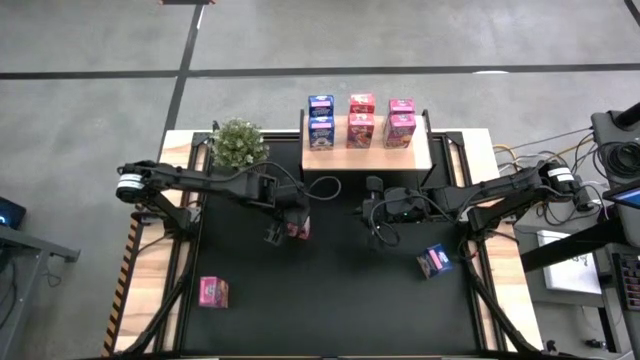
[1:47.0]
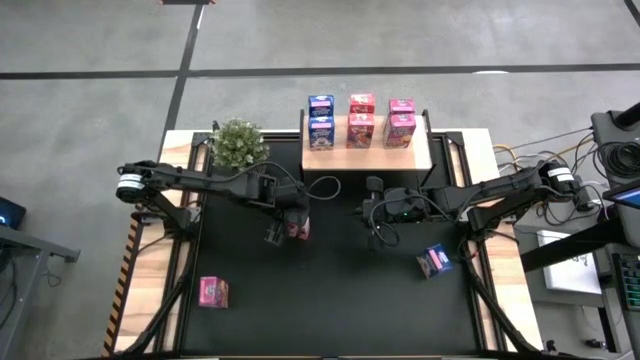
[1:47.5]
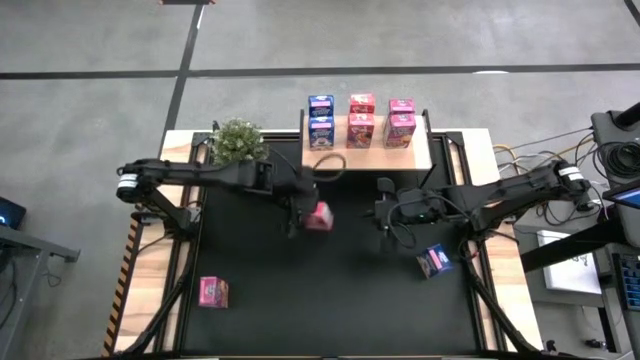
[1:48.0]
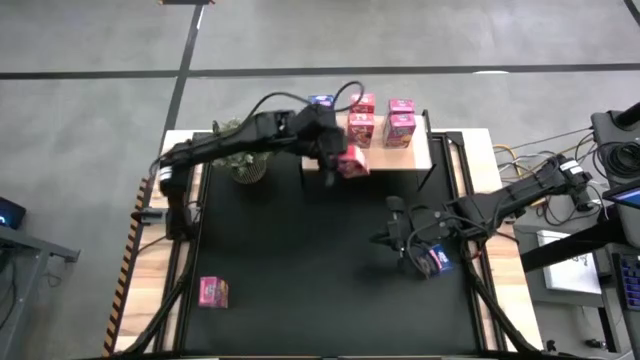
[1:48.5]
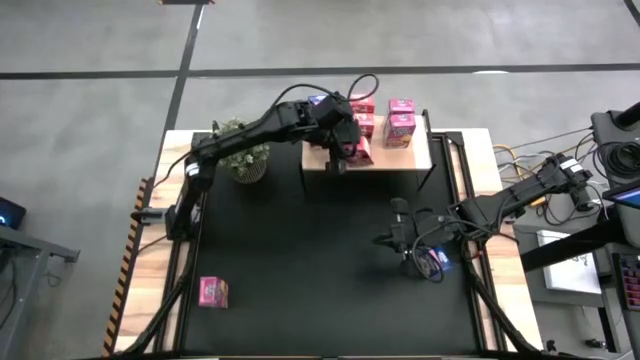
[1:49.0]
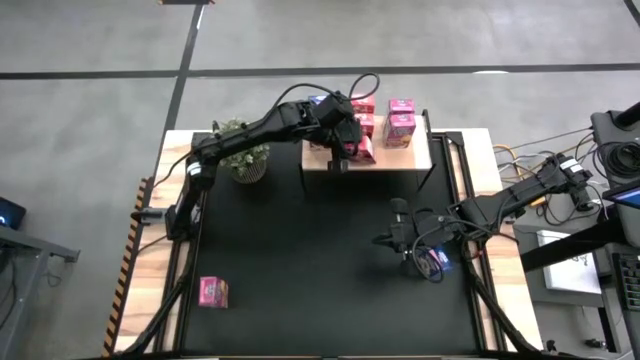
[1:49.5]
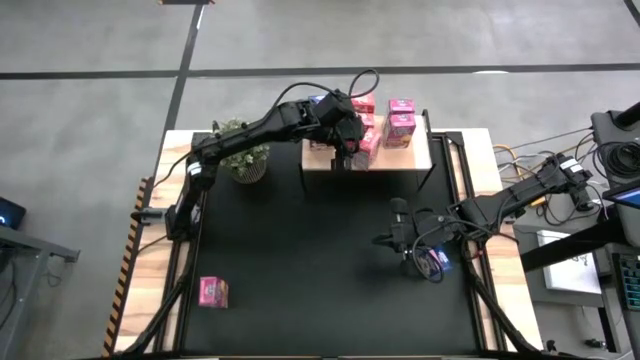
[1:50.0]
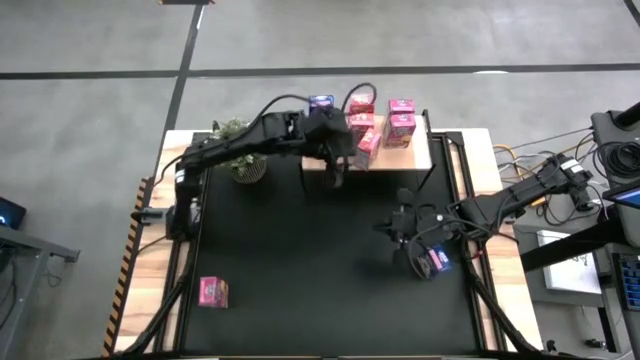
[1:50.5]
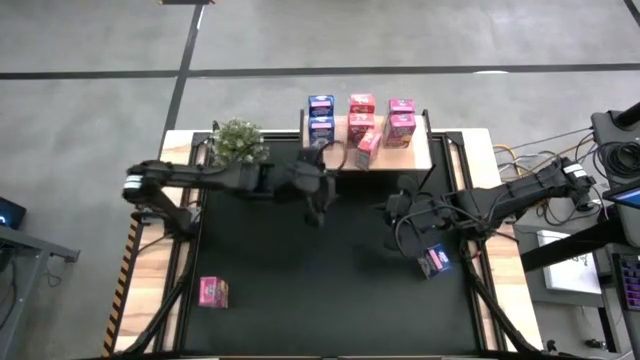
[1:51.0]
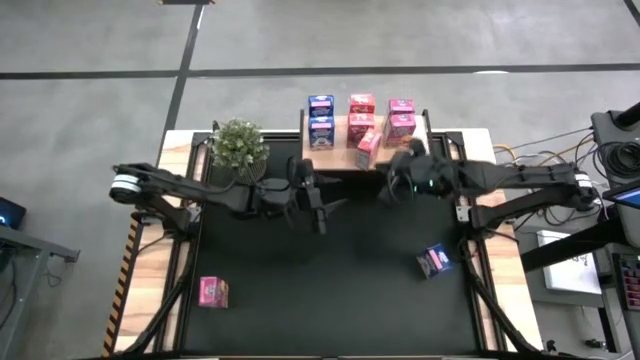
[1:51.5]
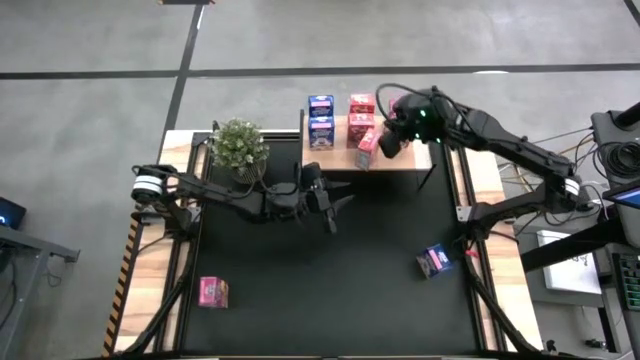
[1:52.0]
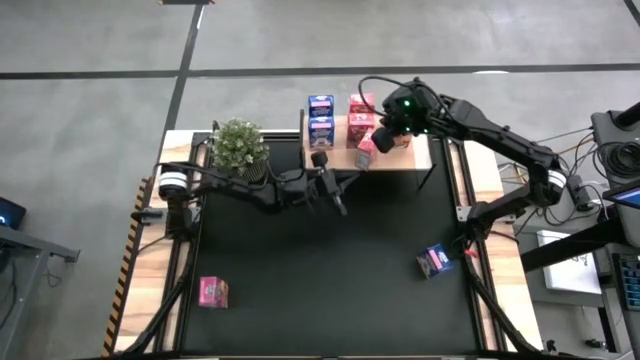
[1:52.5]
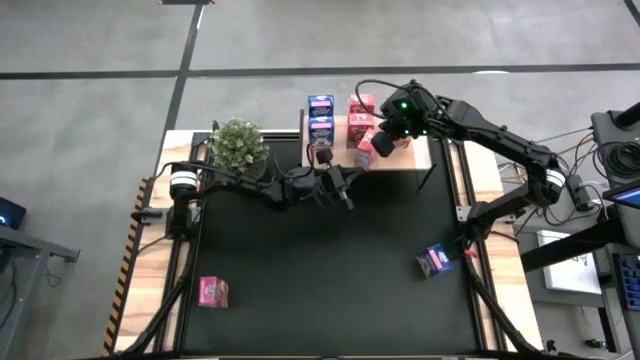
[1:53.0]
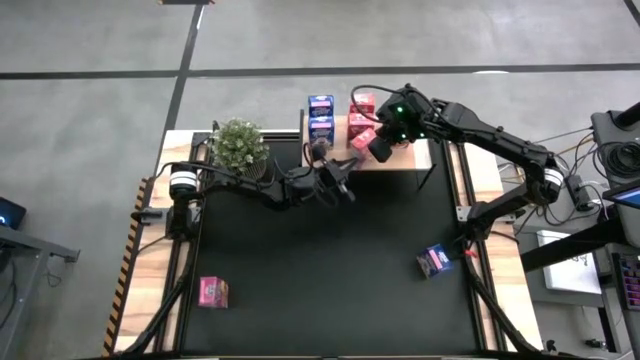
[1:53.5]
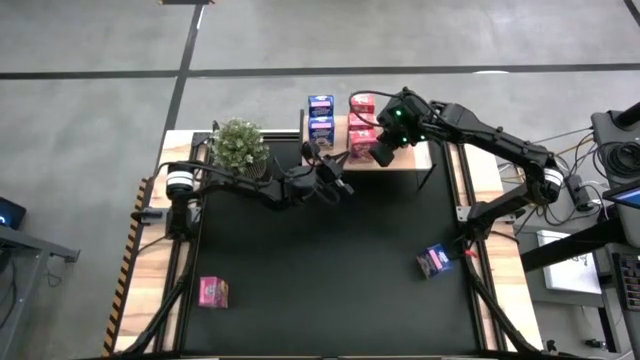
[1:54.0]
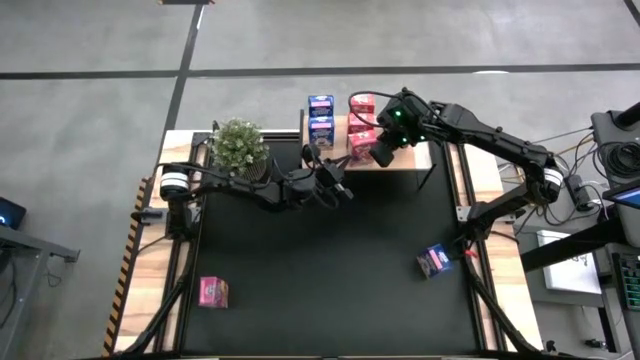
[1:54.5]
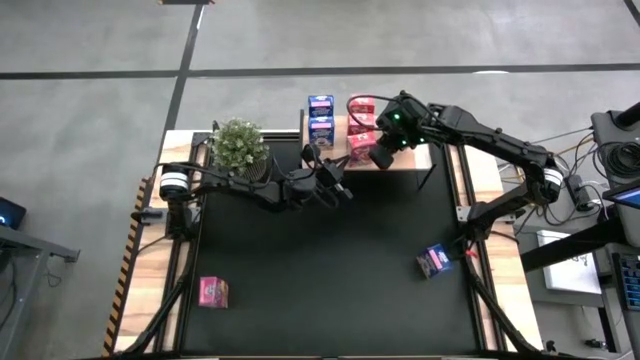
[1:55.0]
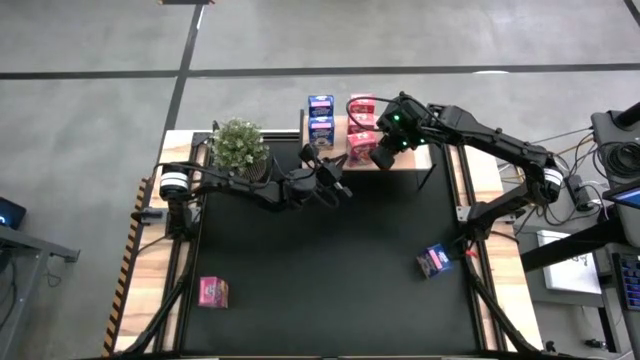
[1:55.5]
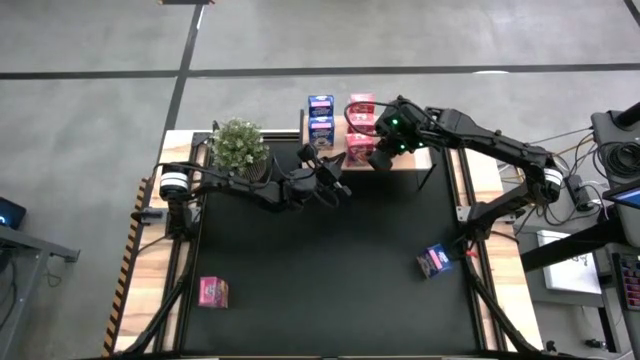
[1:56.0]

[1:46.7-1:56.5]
Task: Stack cereal on shelf
Put the red cereal box on the shelf and align it with the other red cereal boxes on the shelf

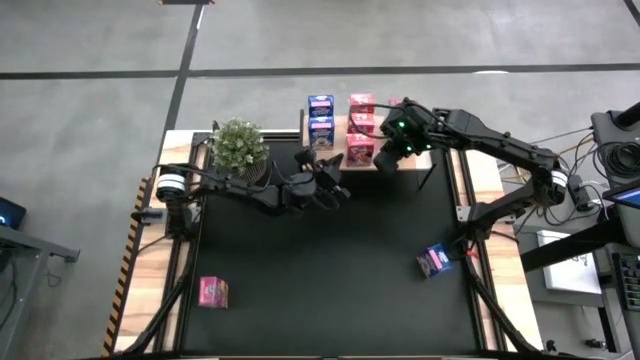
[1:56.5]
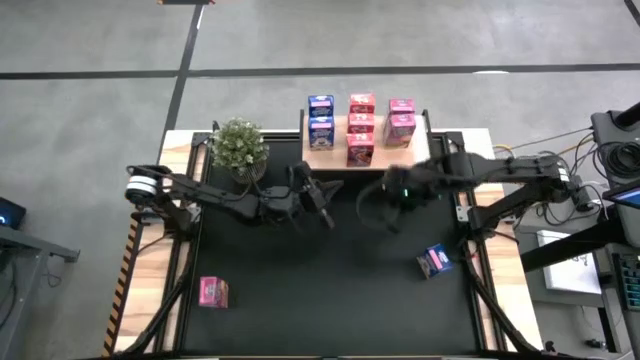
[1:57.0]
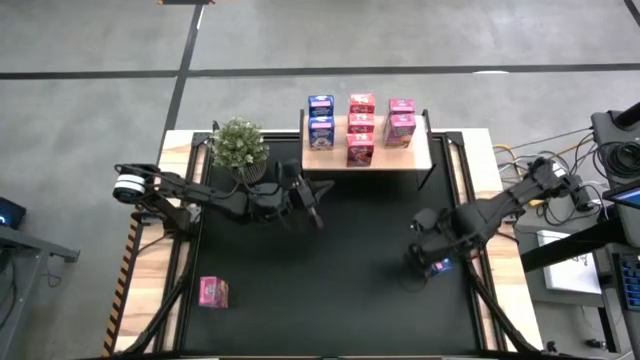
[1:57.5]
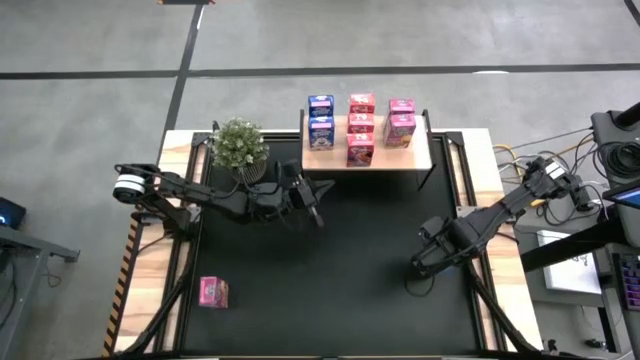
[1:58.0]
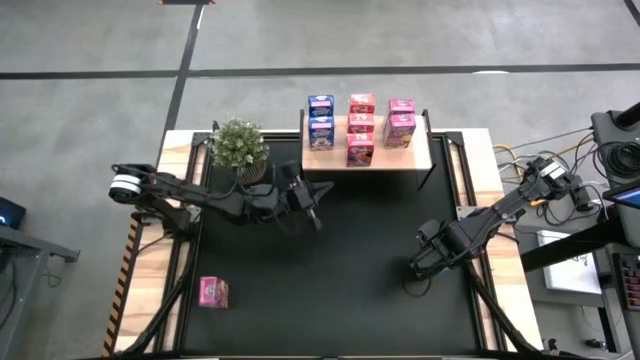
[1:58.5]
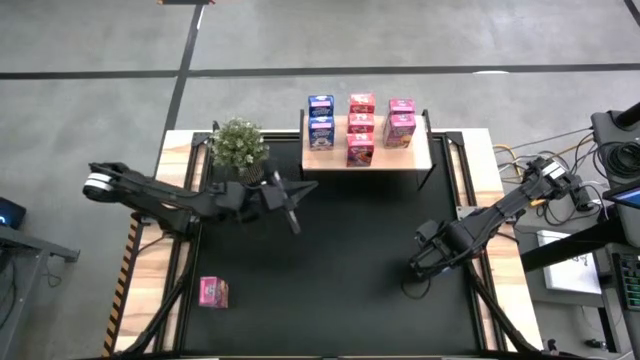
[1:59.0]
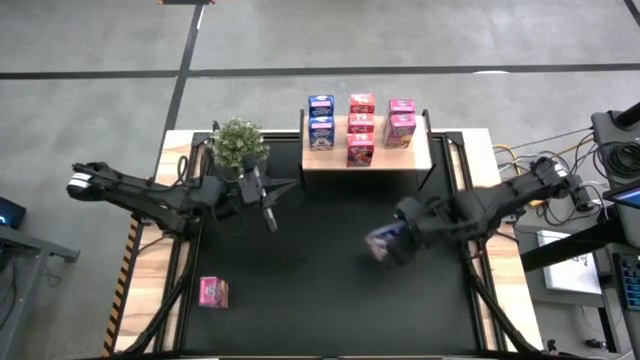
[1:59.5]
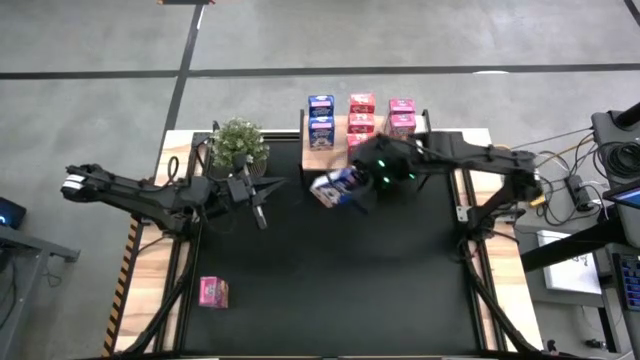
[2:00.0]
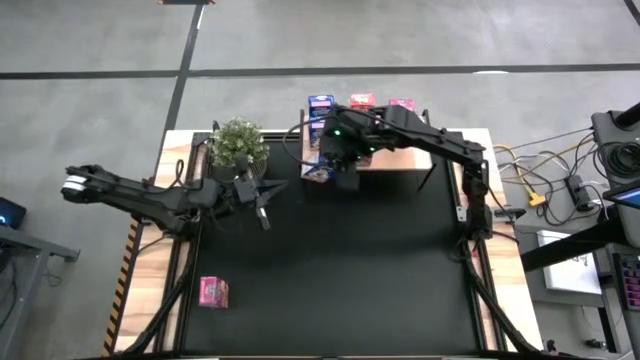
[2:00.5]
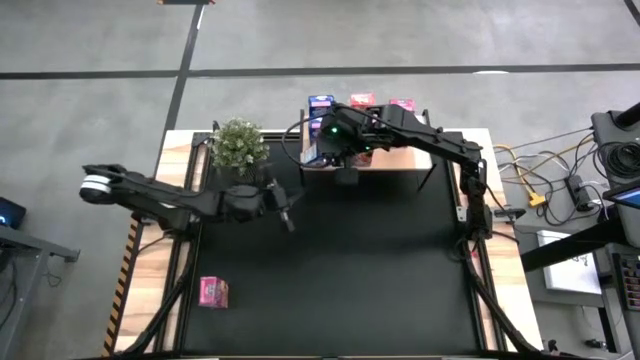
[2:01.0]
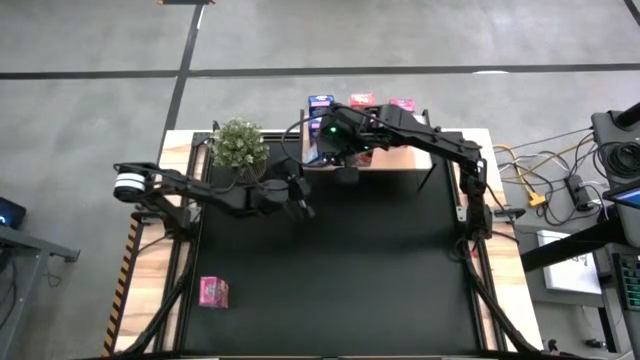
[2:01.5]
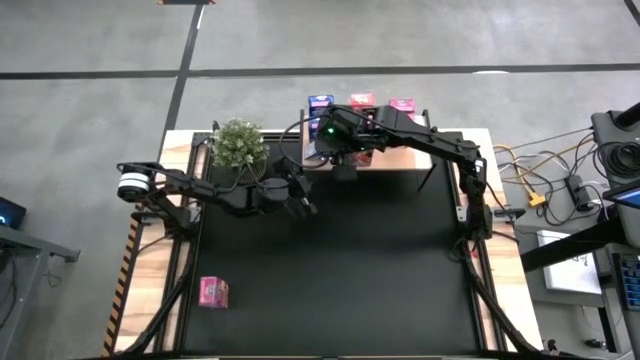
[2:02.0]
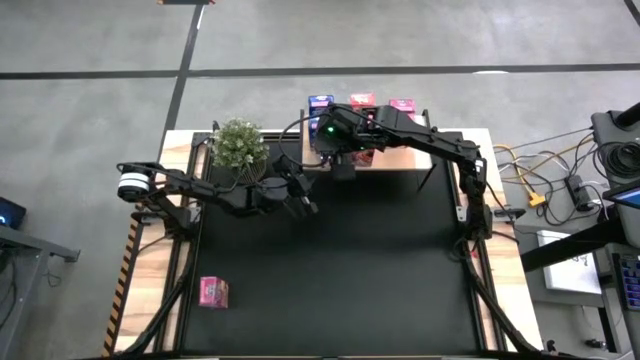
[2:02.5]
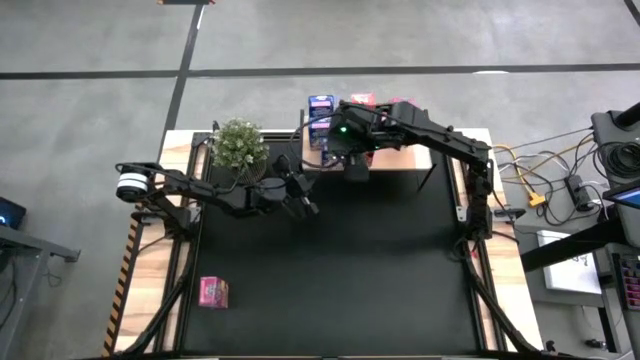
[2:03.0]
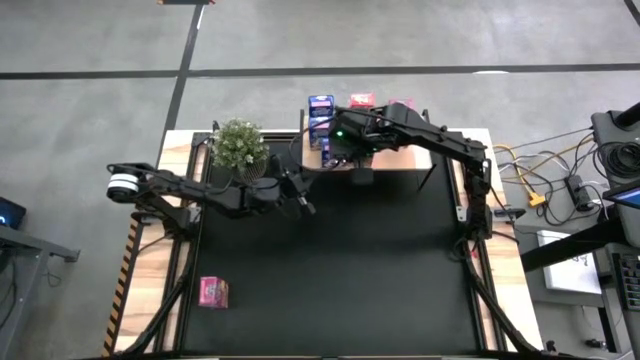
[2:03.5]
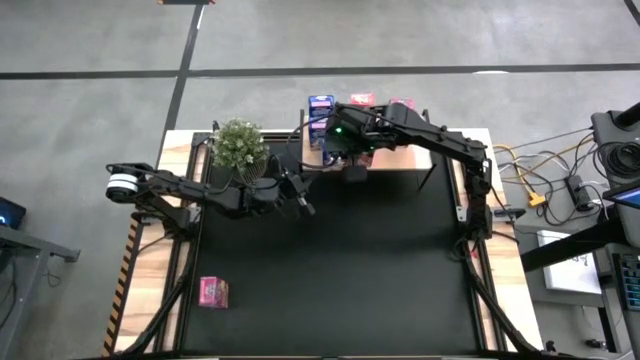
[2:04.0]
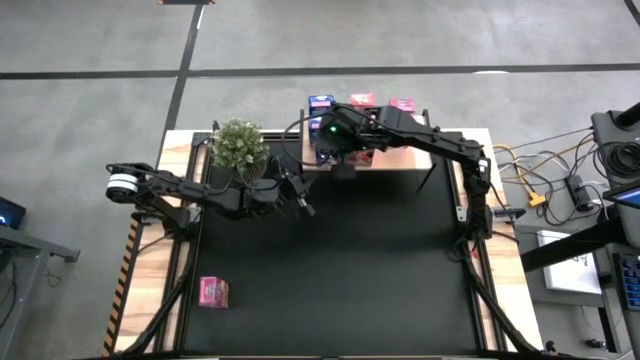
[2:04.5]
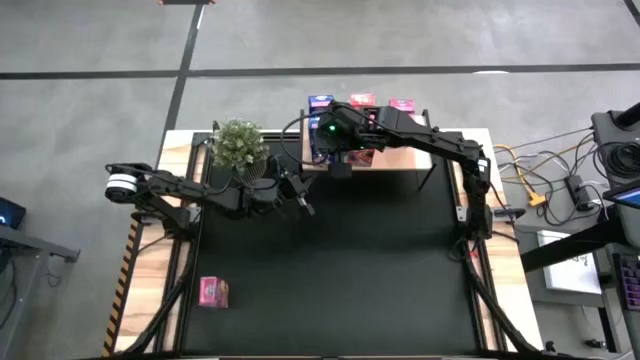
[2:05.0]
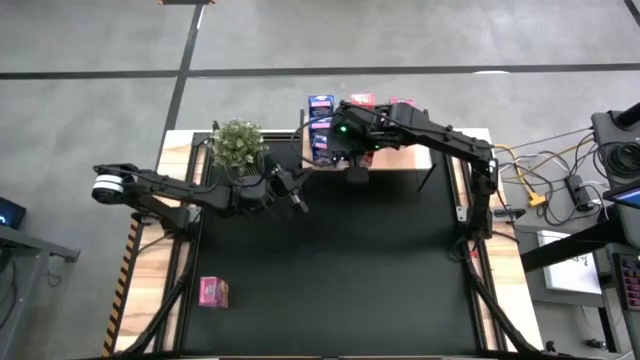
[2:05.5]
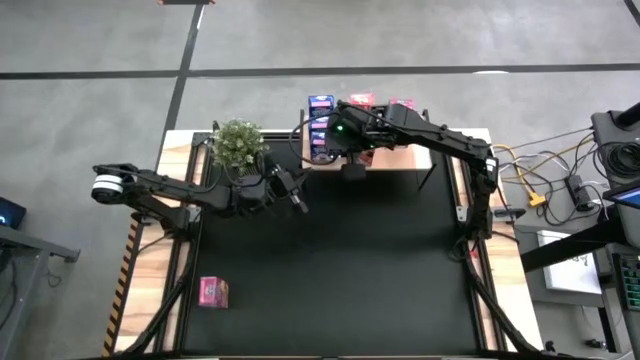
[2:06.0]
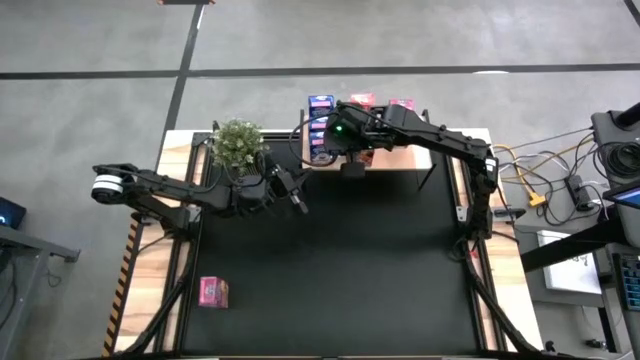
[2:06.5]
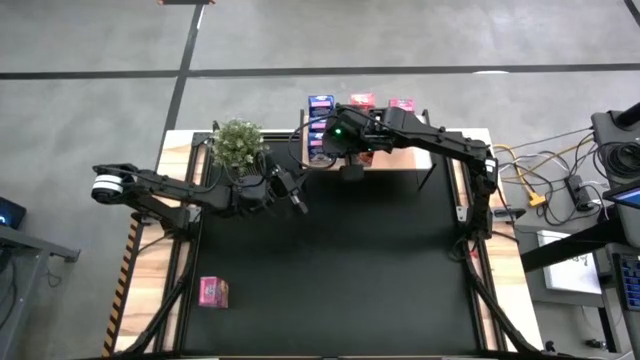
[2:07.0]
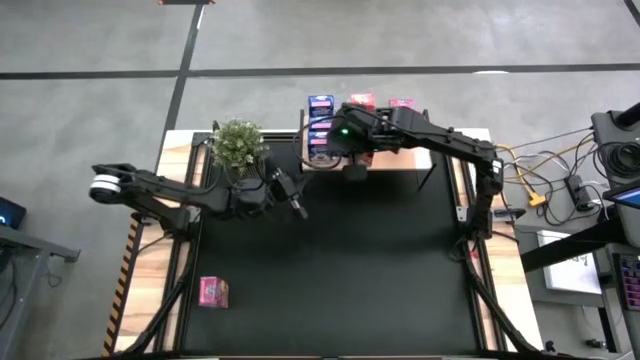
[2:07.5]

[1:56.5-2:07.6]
Put the blue cereal box on the shelf and align it with the other blue cereal boxes on the shelf

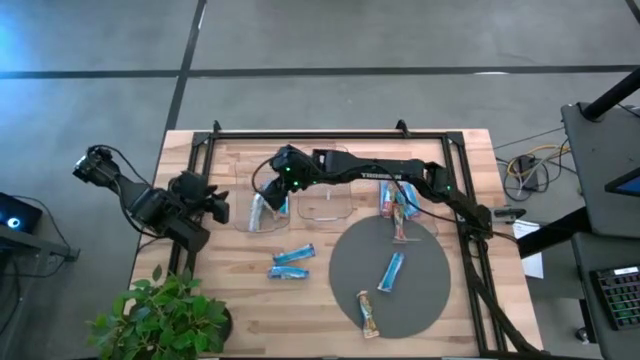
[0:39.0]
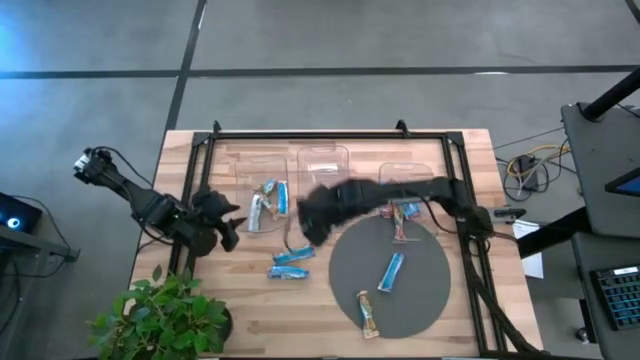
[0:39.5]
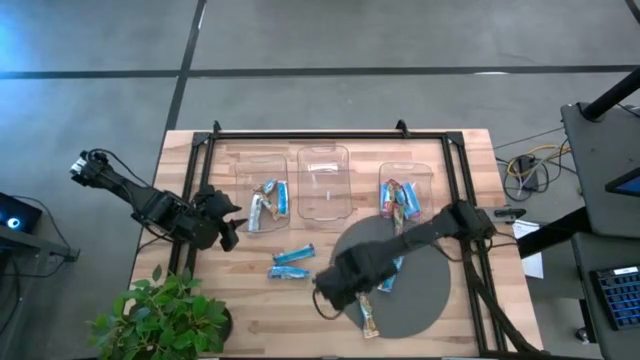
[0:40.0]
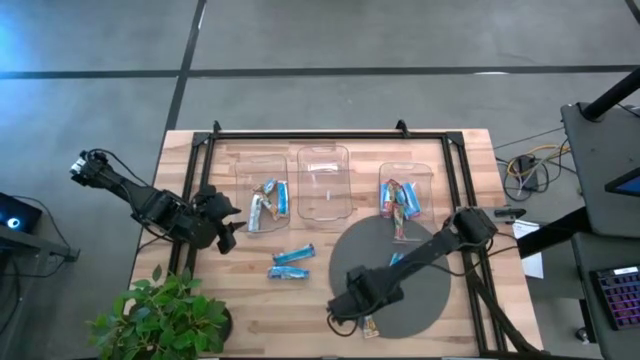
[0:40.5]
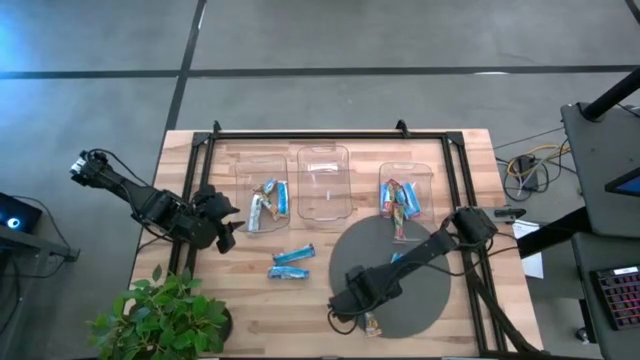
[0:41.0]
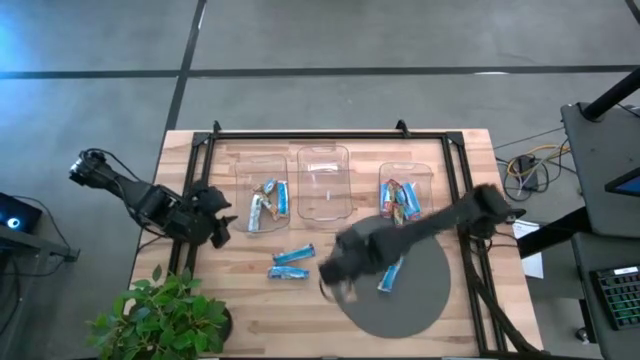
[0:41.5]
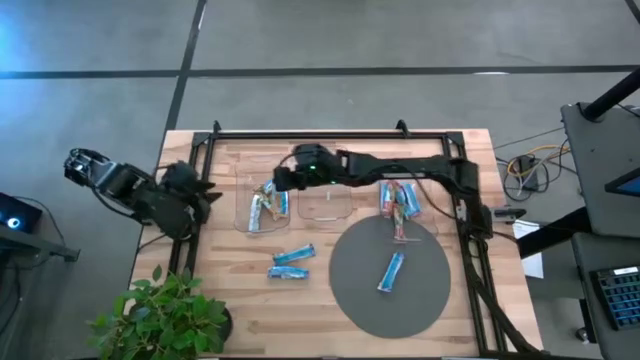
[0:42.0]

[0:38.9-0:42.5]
Task: Pick and place Granola Bars by type
Put the yellow granola bar into the left transparent bin
